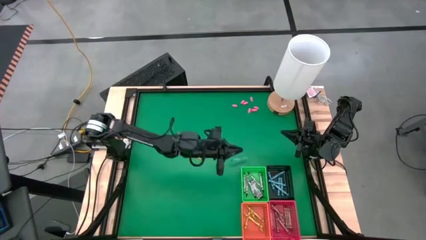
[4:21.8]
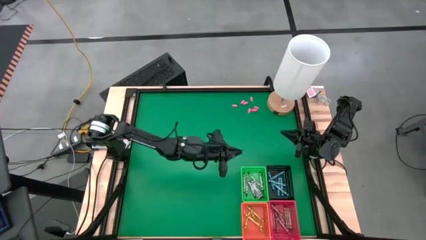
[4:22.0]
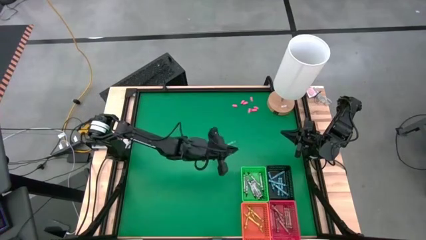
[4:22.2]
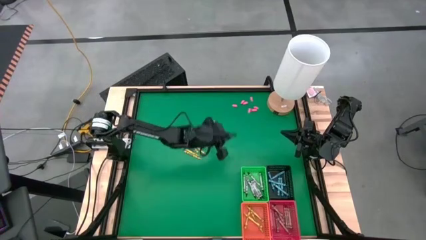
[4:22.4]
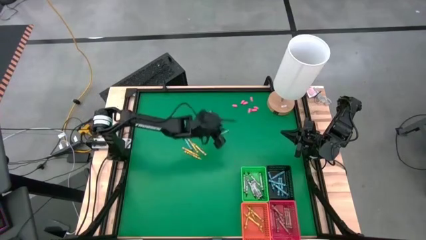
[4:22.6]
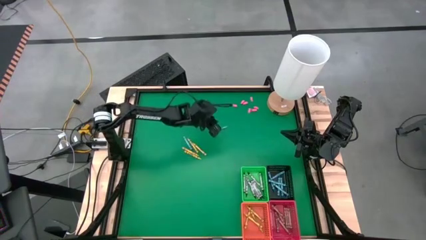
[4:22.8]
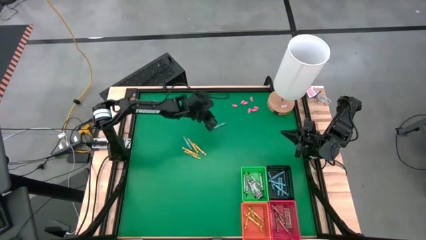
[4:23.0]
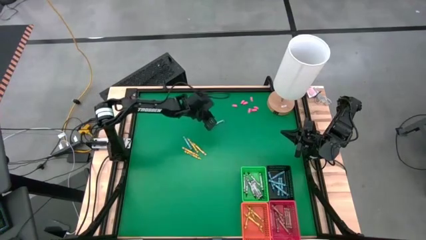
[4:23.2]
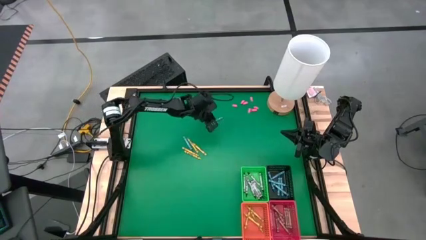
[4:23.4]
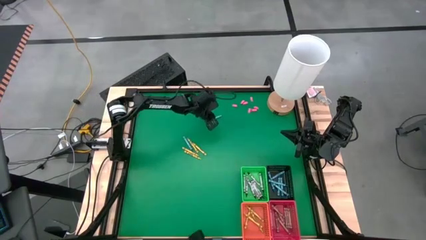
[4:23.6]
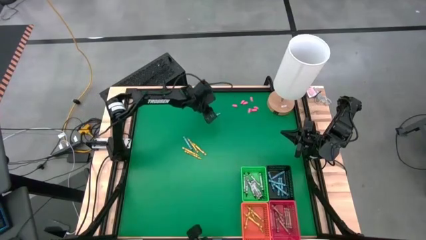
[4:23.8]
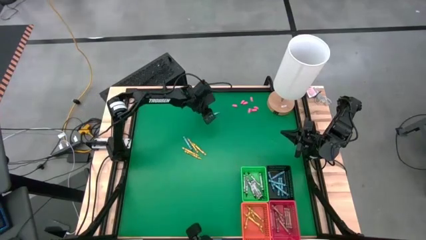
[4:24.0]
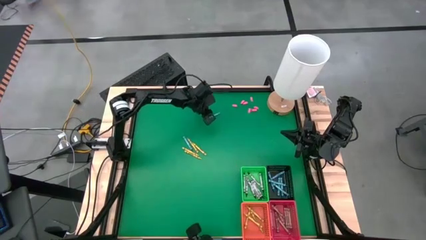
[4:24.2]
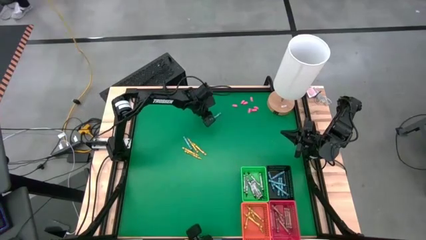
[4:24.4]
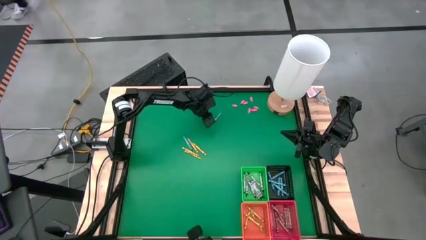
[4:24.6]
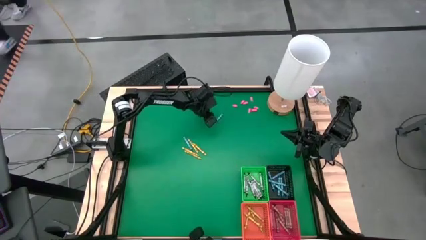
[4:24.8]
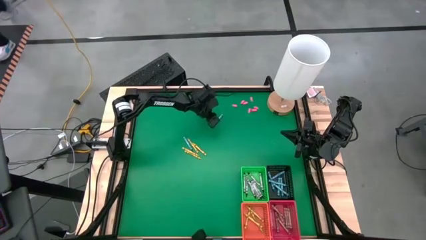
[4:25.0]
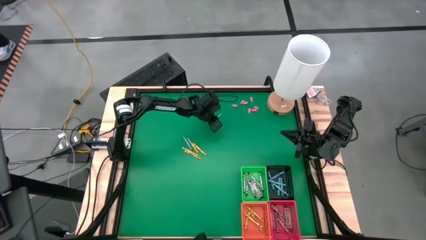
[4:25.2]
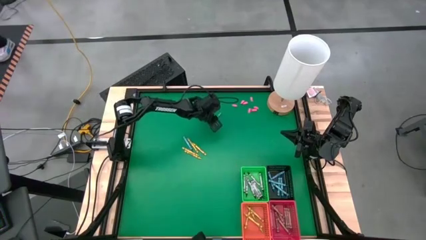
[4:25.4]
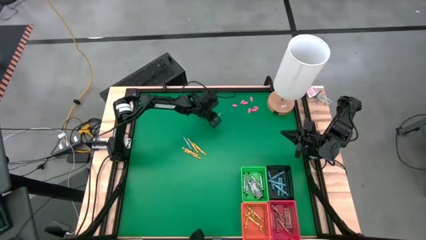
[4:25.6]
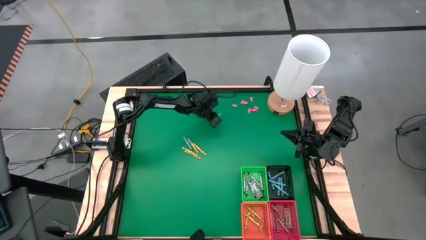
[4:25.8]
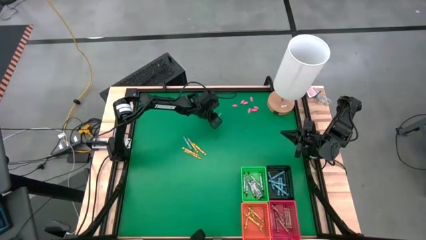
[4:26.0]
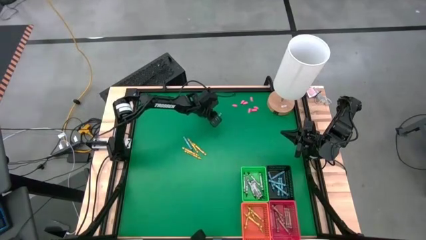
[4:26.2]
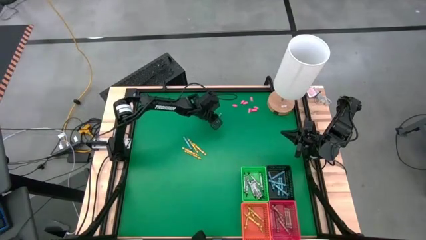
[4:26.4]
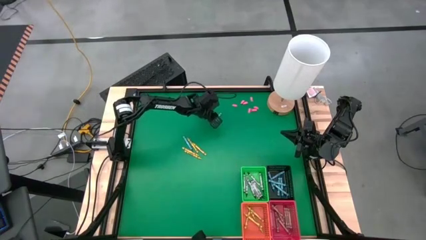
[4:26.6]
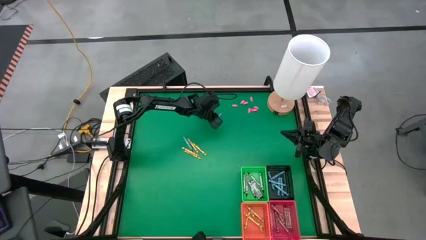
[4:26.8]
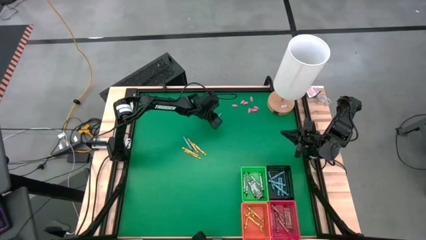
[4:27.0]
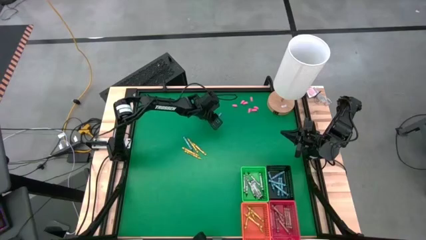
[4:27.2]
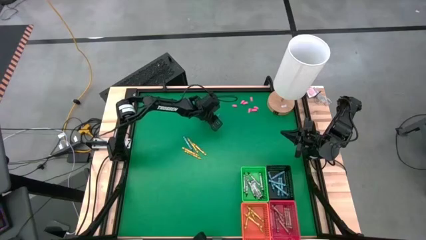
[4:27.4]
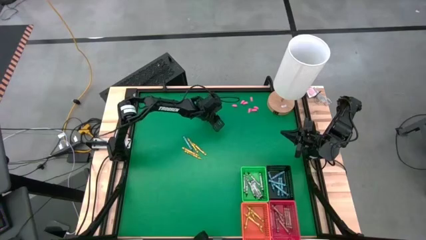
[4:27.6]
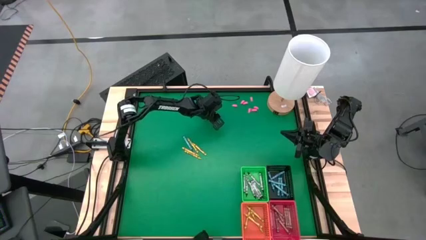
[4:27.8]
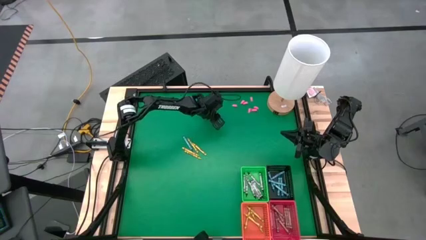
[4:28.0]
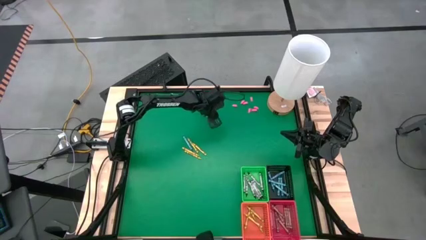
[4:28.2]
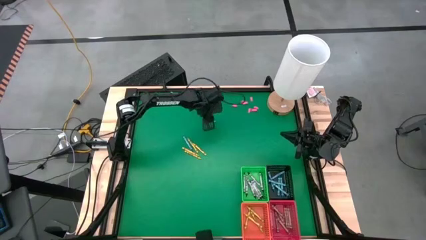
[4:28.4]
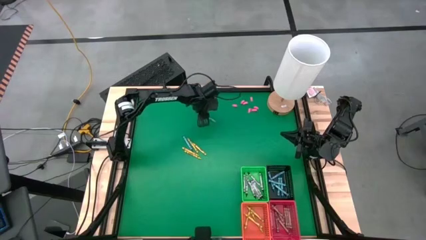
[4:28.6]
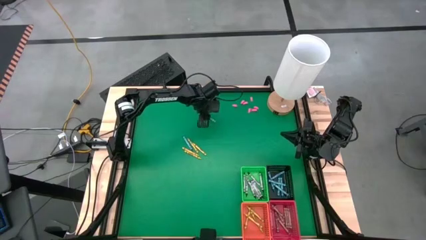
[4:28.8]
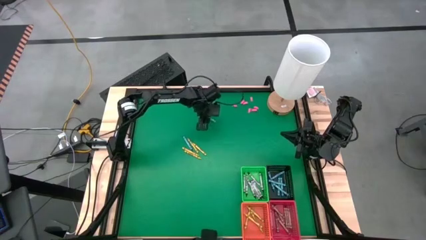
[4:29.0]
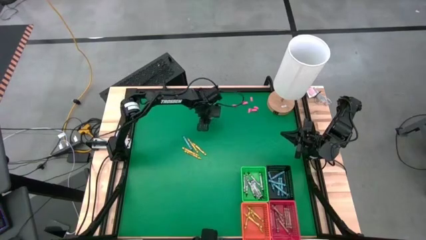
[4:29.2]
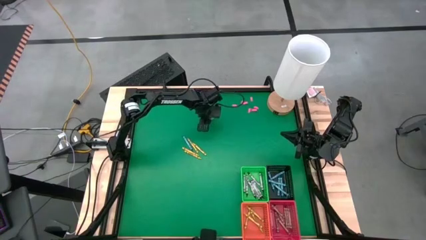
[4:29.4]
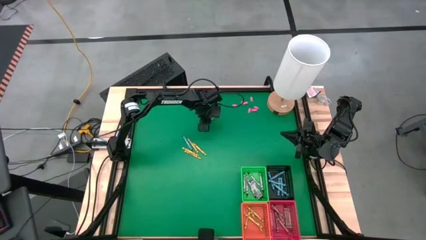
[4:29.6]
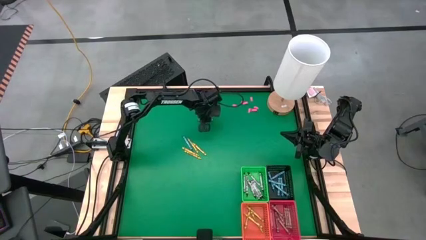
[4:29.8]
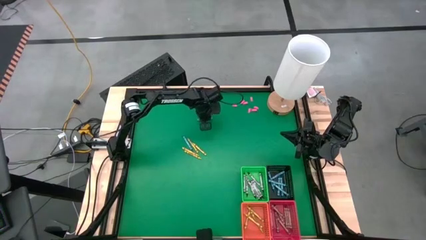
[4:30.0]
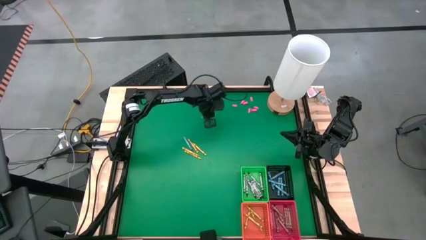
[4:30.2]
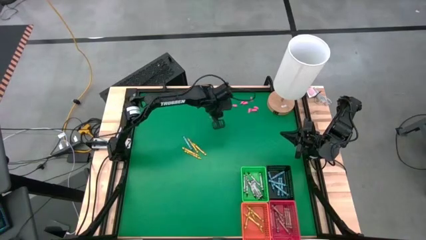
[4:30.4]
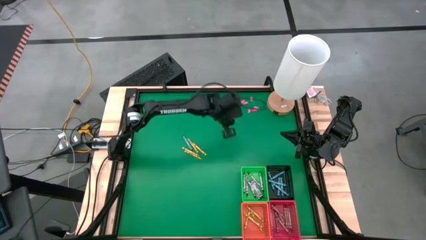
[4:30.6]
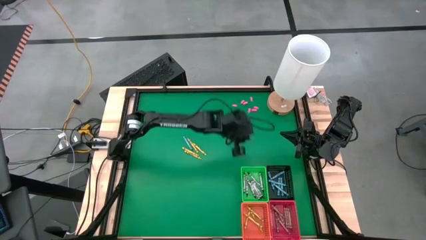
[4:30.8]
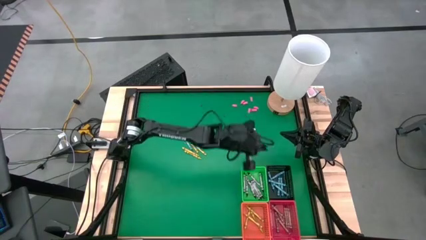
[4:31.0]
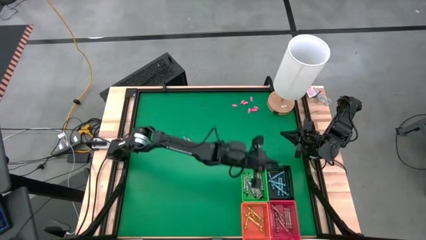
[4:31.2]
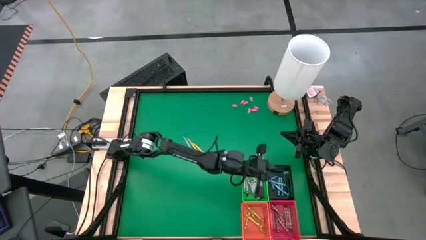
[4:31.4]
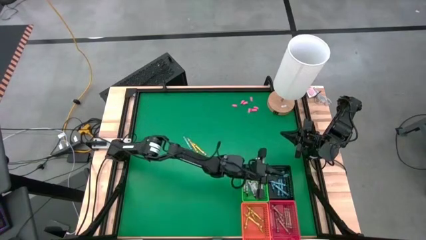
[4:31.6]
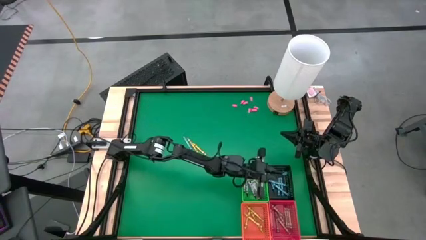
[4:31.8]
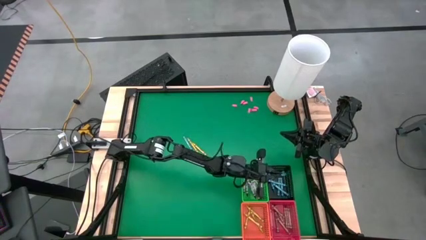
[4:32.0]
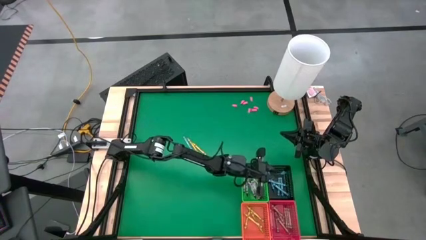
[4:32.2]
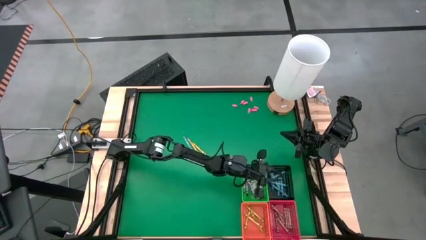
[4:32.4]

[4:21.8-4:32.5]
Task: Sort crayons
Put the blue crayon into the black bin

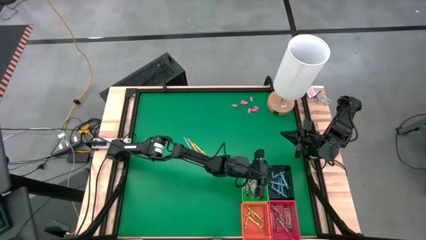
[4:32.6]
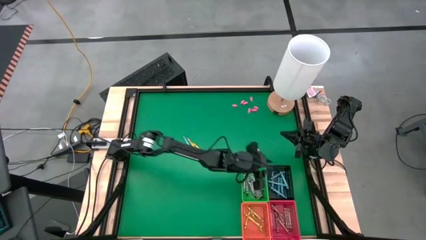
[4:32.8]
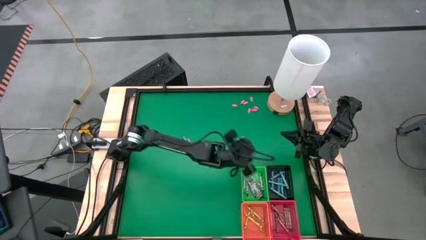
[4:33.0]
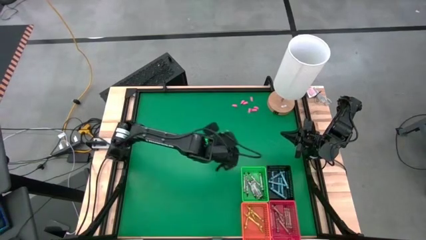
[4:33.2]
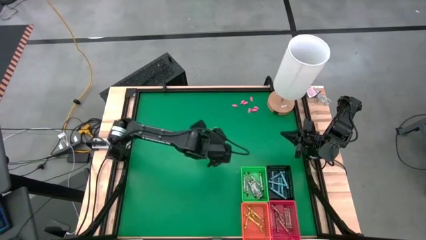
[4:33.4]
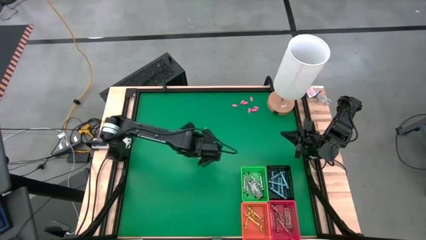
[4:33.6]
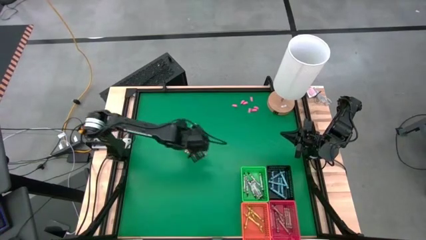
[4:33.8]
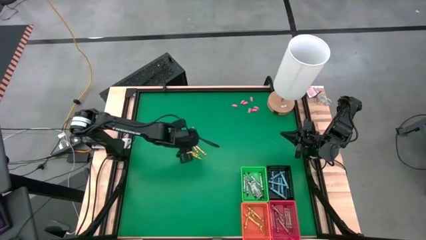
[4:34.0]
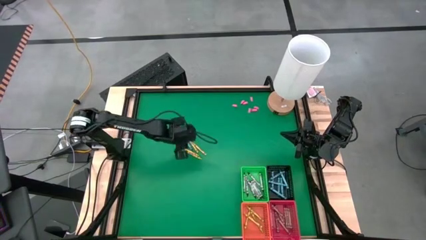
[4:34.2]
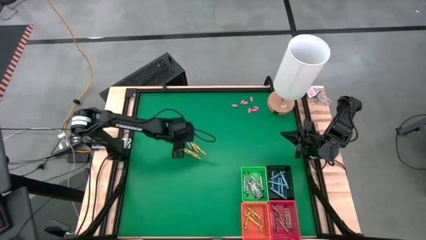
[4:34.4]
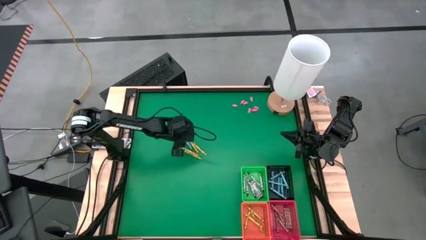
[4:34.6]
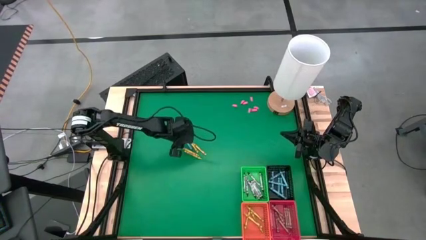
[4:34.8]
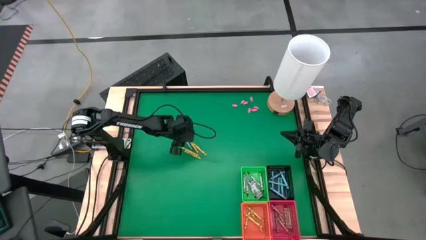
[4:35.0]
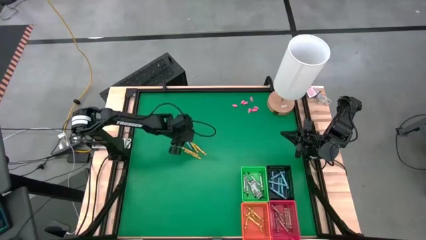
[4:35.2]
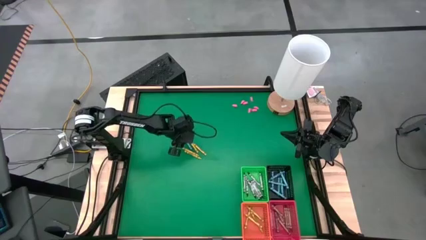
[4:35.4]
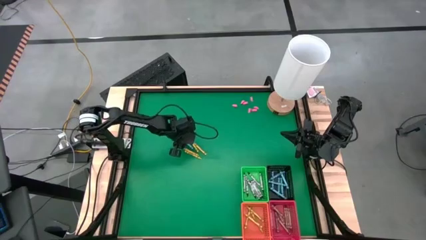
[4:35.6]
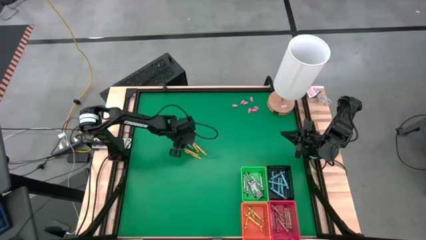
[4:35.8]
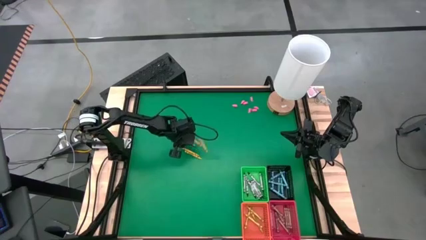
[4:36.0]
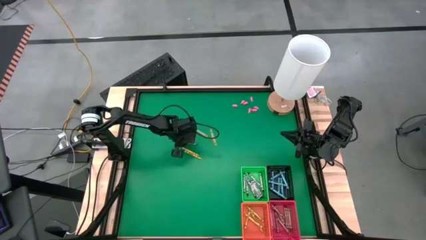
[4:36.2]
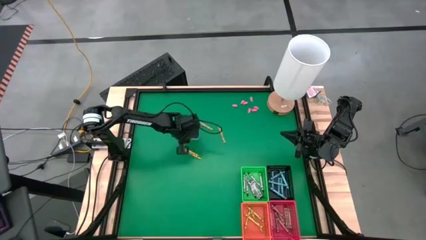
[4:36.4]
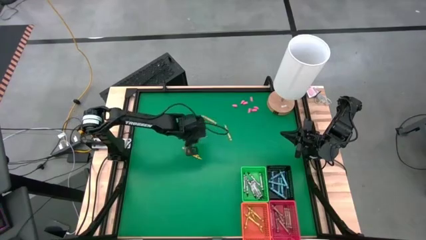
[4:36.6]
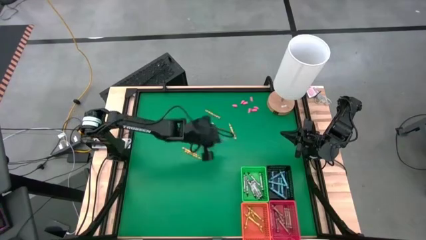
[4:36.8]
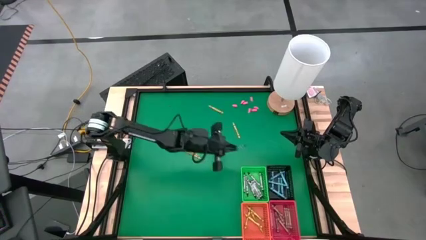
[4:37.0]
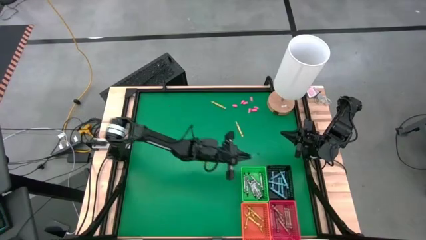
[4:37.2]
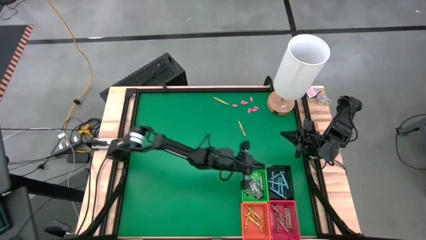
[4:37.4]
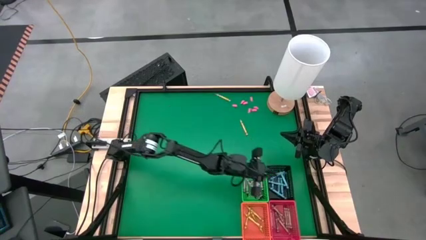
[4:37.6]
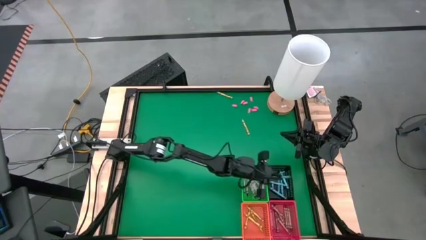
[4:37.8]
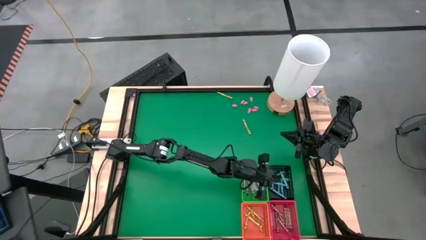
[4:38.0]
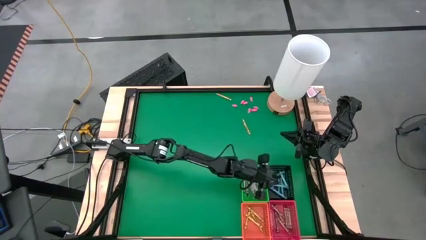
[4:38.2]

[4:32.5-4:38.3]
Put the blue crayon into the black bin

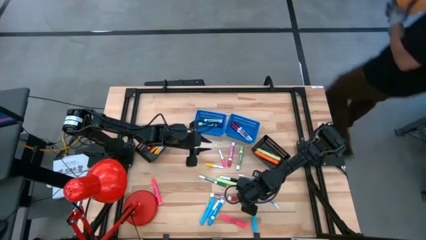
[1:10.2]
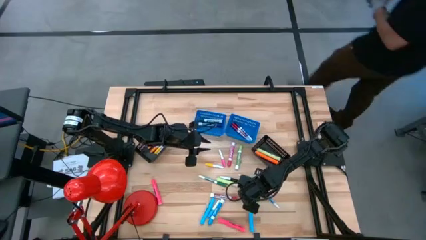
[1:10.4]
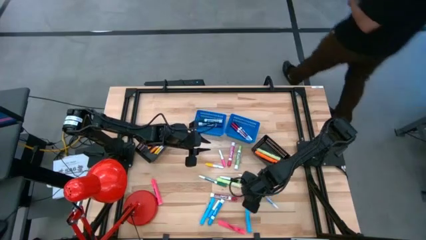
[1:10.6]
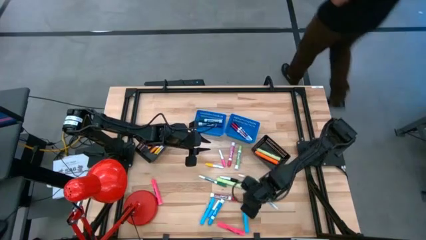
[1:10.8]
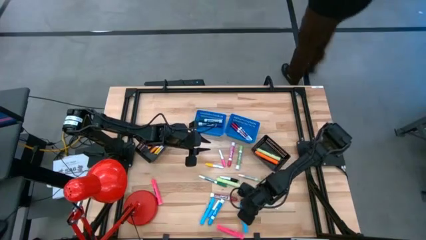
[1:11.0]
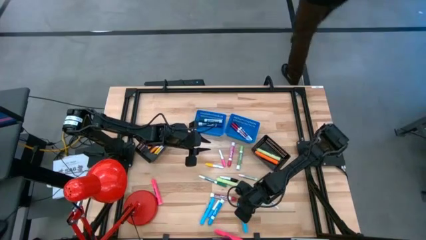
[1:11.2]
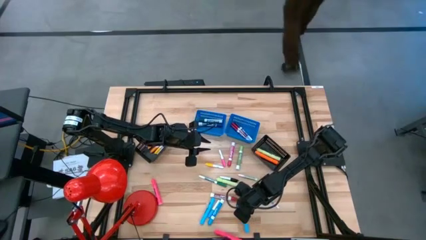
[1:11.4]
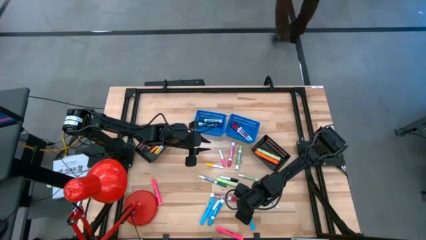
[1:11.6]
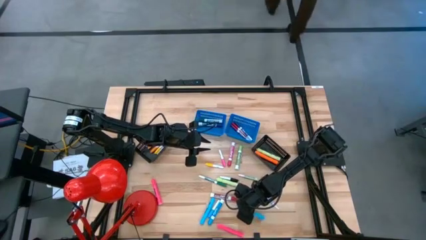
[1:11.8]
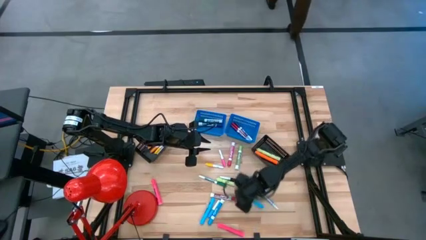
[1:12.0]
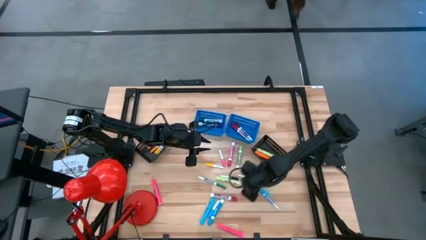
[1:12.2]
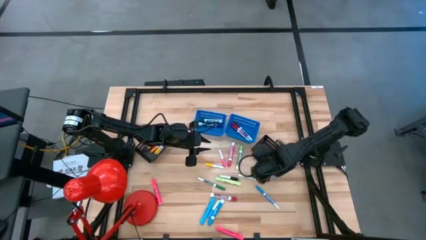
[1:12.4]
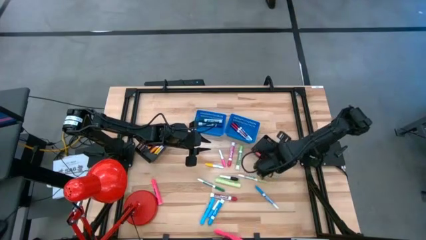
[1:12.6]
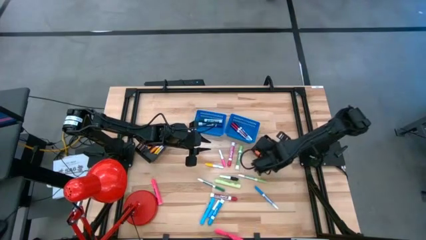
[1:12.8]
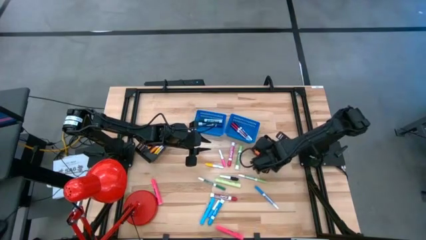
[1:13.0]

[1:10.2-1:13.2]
Task: Pick & Place Markers
Put the light blue highlighter into the right black bin
